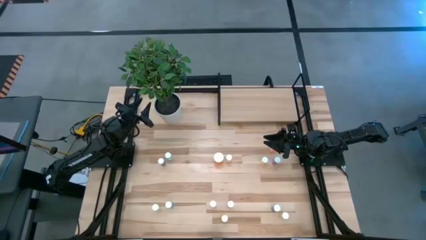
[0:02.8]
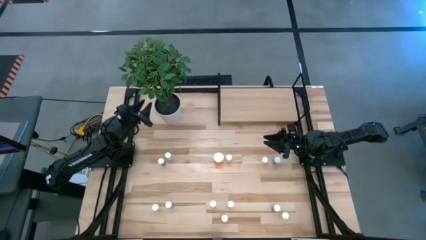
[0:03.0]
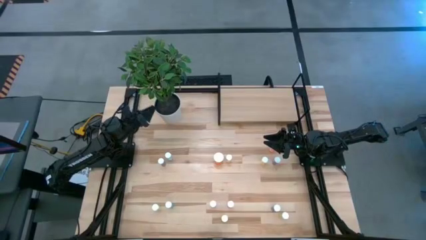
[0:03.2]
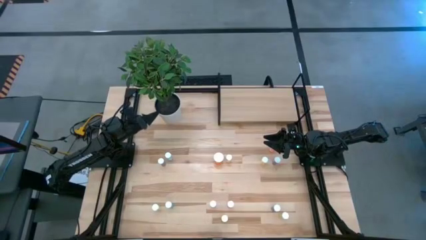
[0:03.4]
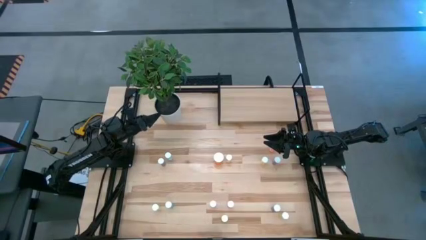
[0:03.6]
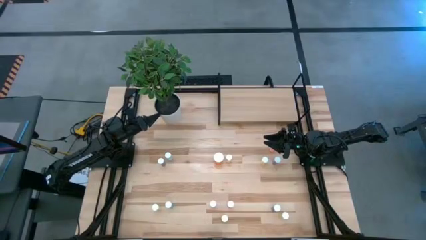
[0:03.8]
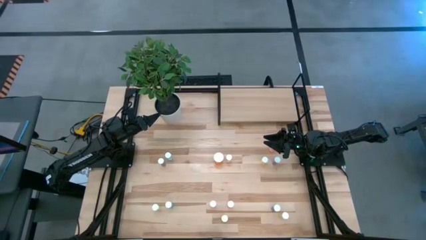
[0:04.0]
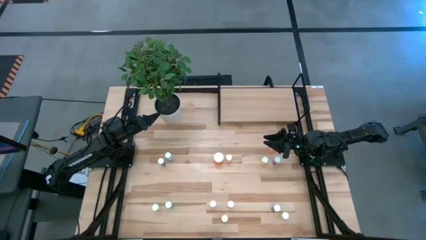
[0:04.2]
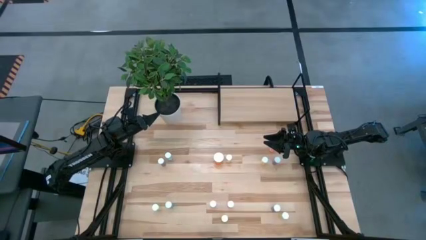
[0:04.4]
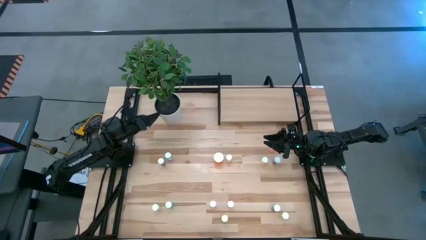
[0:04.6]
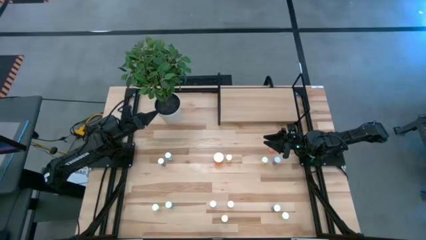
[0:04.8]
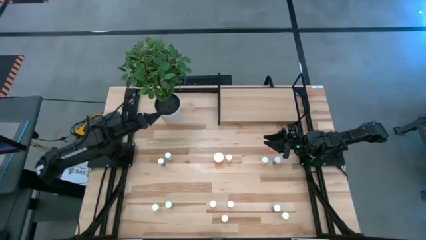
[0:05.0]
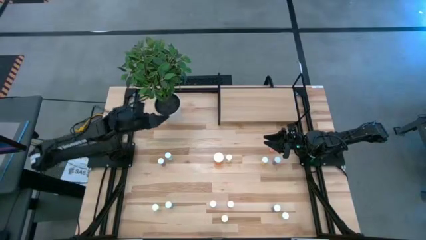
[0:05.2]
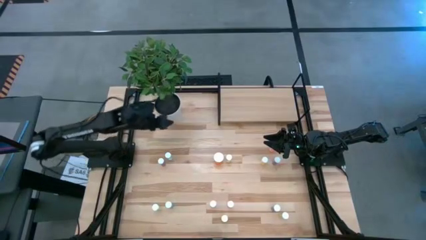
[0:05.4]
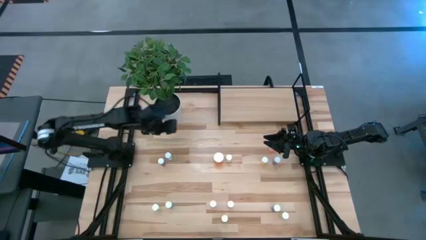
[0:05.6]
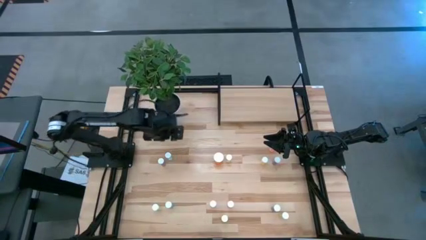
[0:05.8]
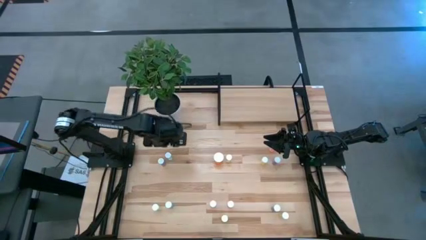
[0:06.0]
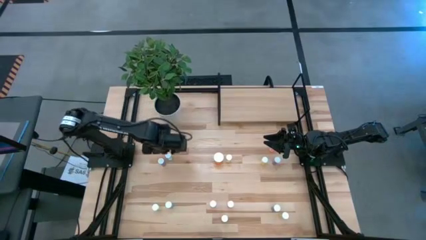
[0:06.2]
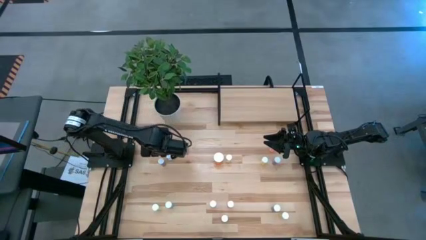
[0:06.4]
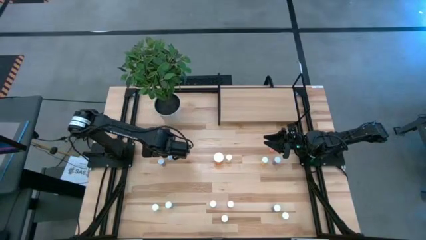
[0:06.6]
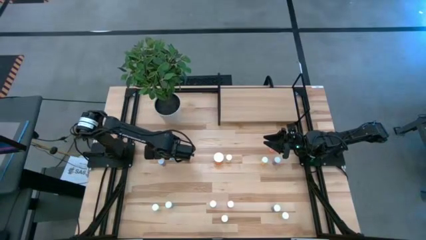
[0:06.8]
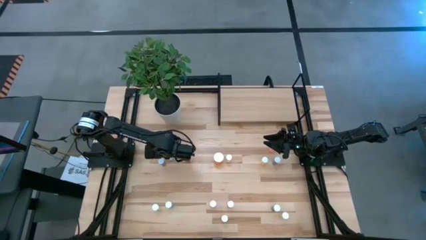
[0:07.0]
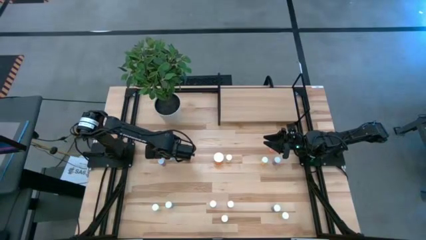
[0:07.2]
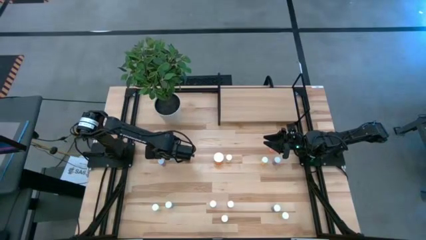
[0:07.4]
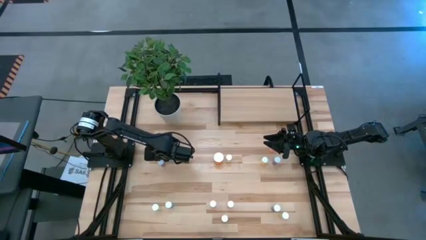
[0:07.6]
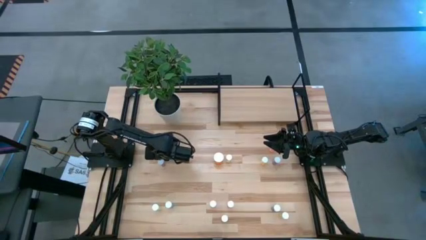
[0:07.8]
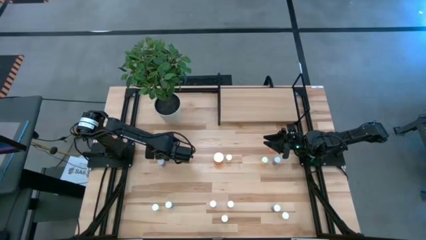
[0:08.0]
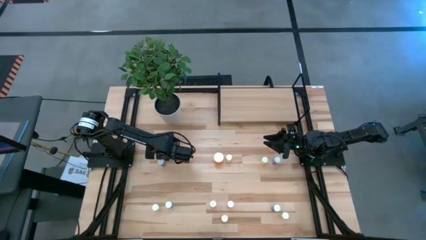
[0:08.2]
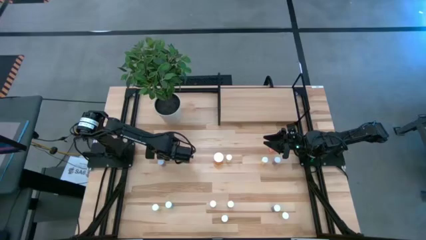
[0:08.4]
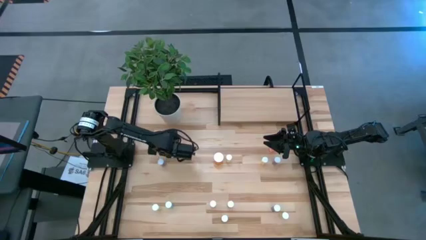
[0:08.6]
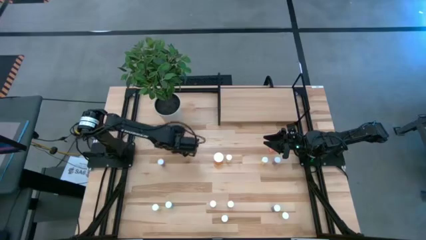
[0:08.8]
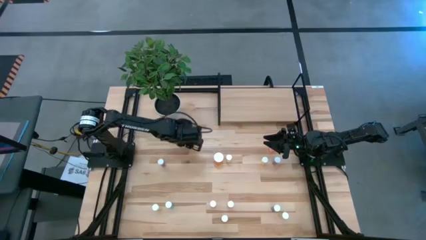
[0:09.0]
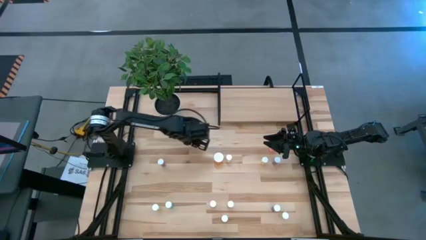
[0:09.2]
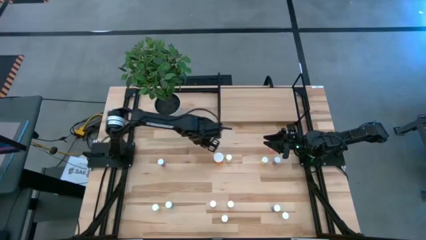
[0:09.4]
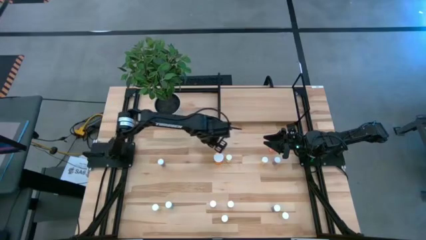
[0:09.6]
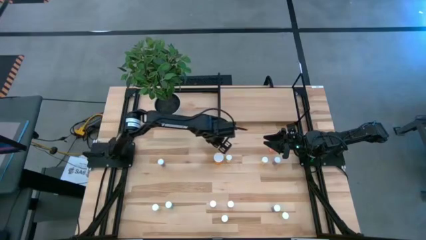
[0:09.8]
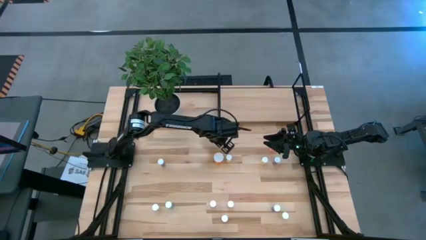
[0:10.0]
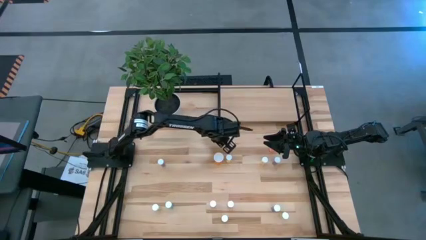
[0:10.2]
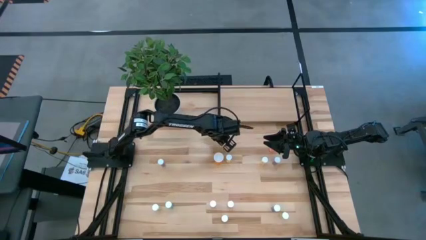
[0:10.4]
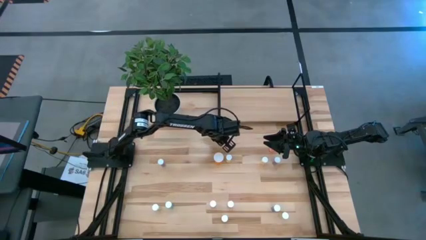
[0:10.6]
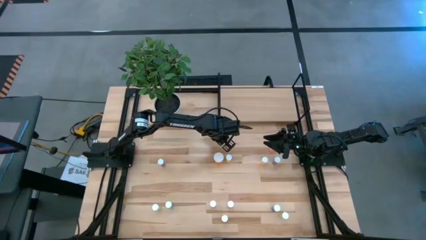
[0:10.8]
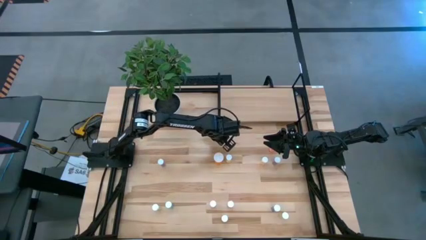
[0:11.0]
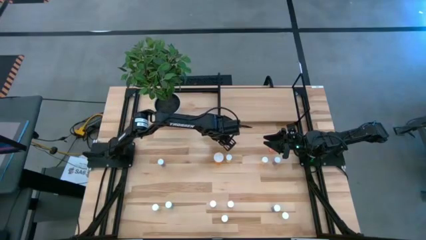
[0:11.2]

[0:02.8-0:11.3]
Task: Pick and place medicine bottles onto shelf by color
Move the green pill bottle to the top center of the table

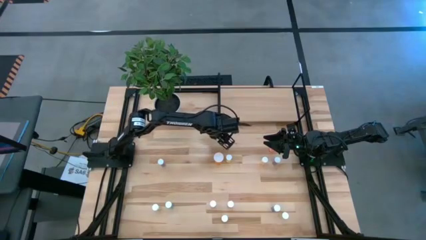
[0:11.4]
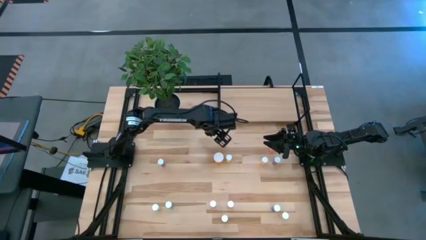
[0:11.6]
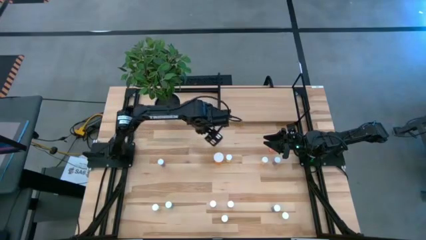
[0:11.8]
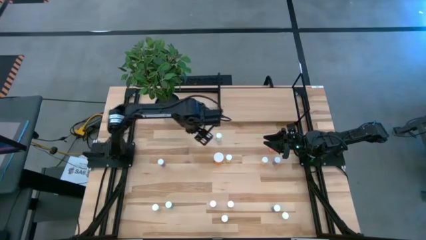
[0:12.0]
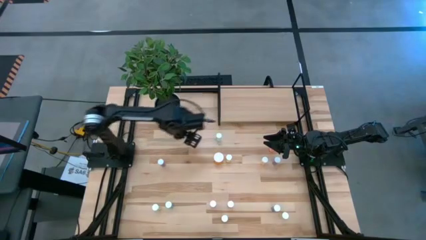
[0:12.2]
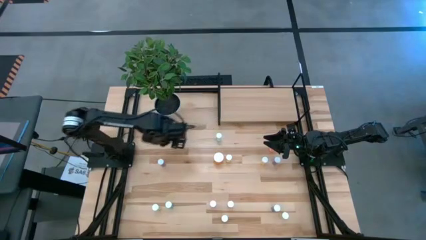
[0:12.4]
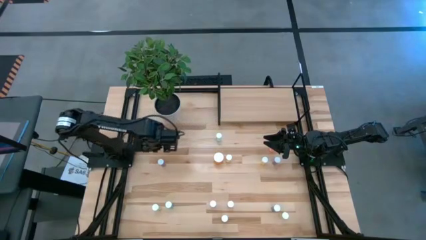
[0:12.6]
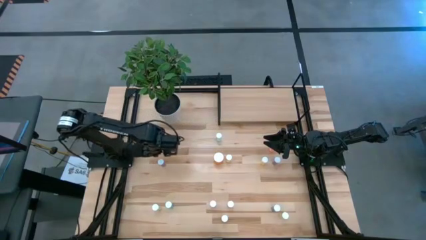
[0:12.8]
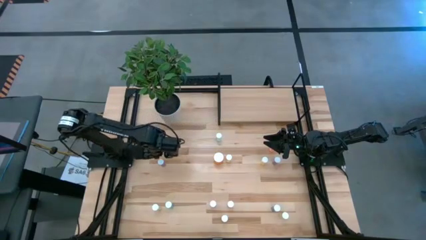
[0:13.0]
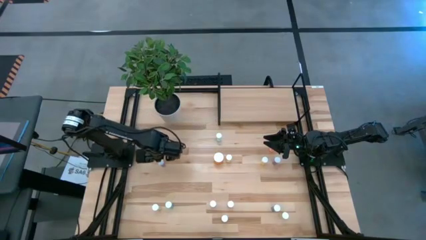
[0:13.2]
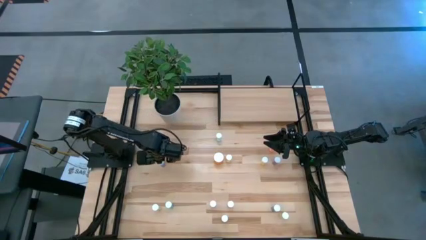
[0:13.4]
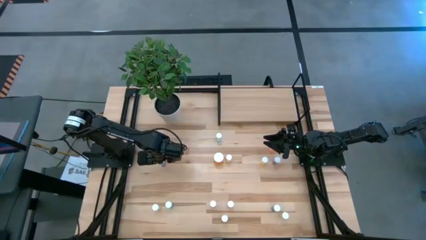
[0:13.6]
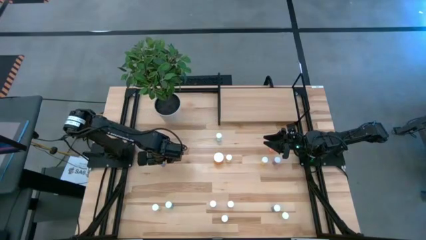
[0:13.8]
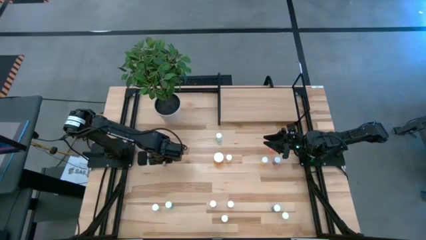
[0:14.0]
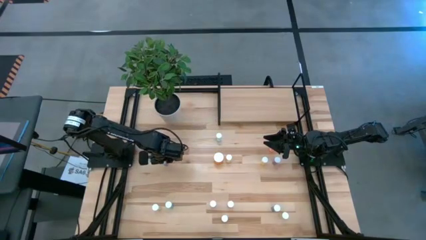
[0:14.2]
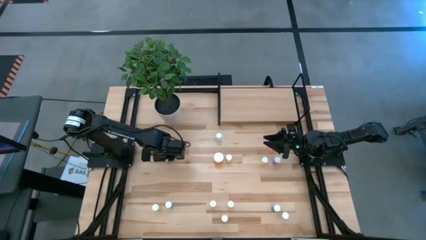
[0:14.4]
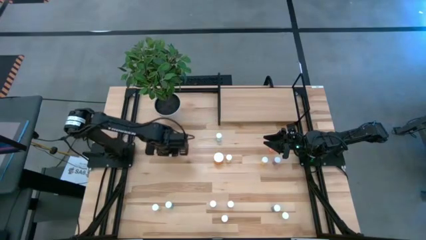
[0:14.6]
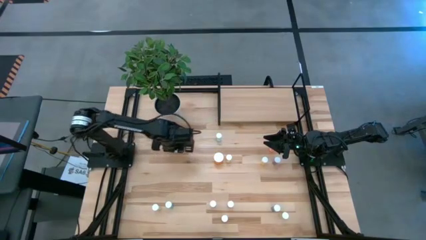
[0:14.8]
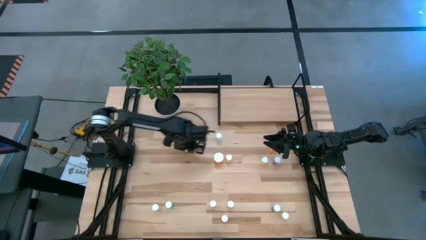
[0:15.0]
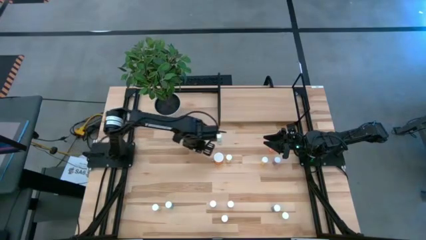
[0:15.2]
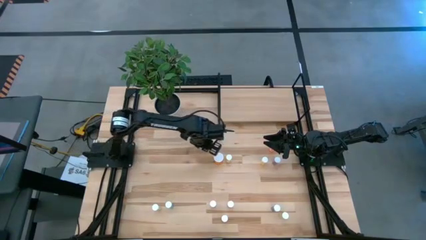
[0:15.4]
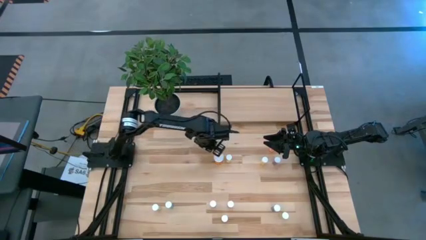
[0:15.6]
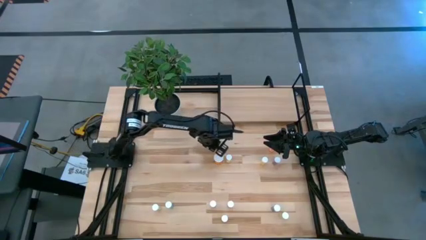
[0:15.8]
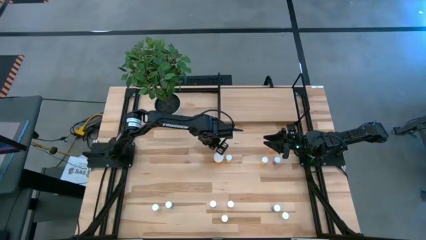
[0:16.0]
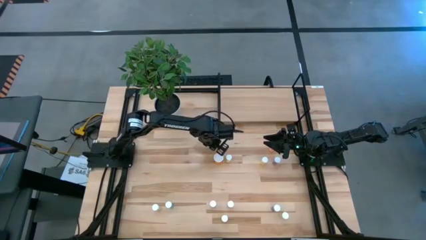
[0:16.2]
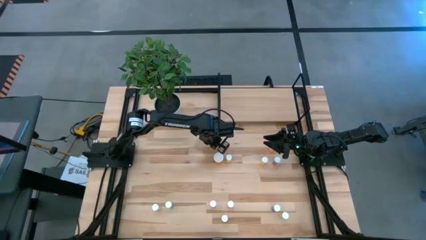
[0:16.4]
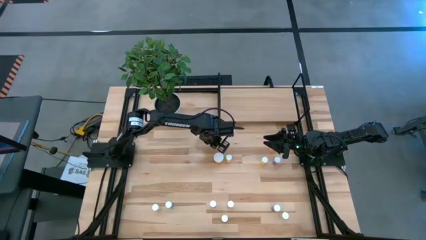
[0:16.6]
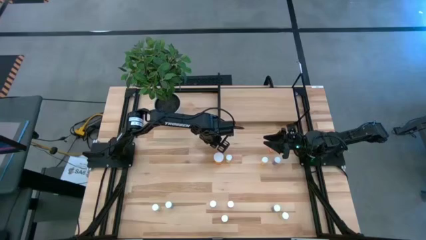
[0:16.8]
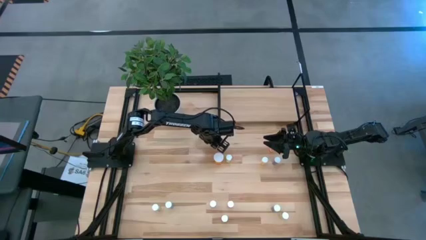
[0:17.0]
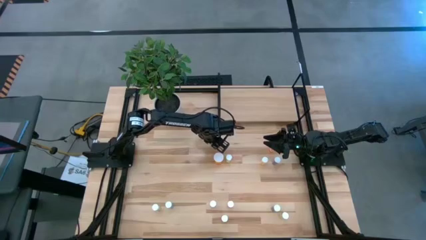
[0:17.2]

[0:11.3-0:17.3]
Move the blue pill bottle to the top center of the table

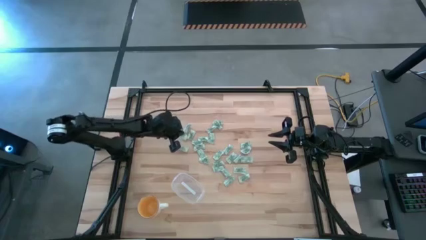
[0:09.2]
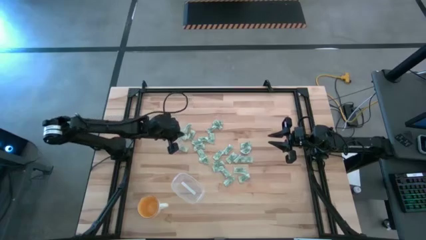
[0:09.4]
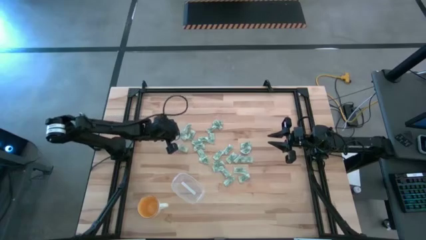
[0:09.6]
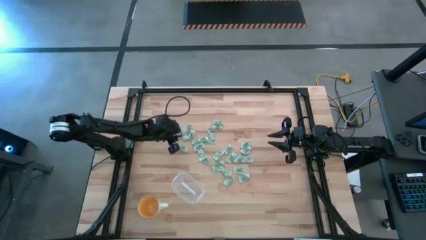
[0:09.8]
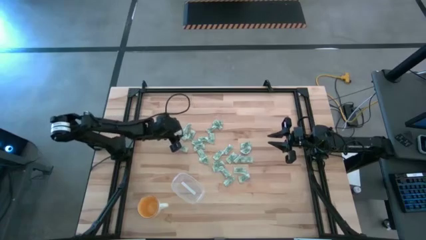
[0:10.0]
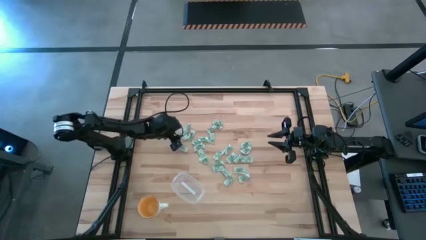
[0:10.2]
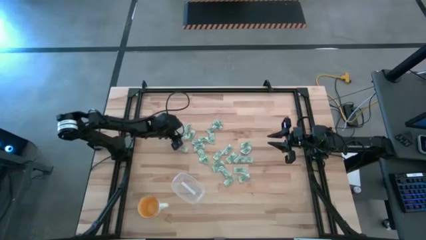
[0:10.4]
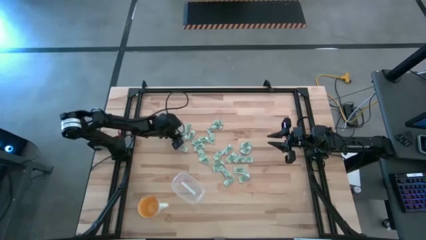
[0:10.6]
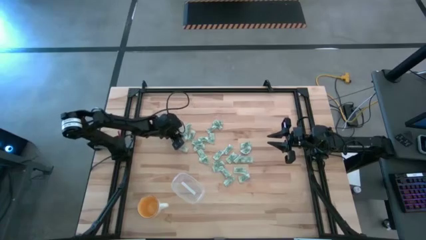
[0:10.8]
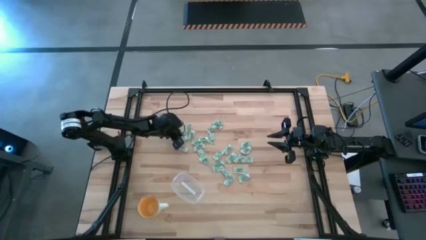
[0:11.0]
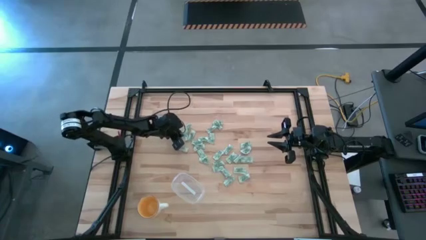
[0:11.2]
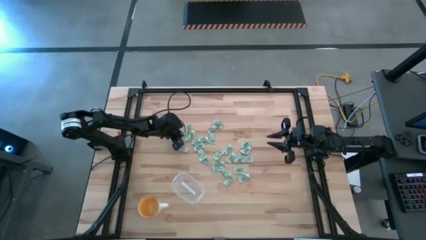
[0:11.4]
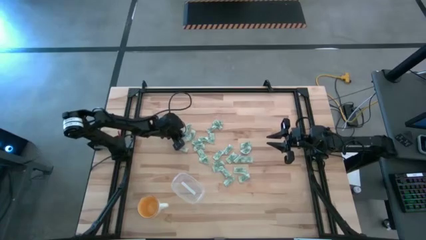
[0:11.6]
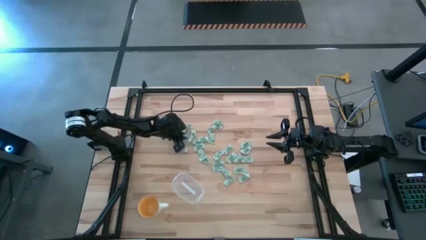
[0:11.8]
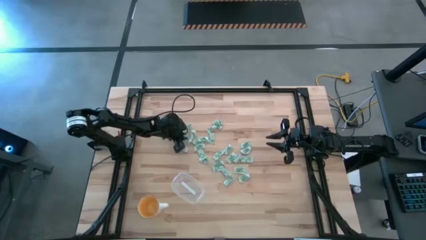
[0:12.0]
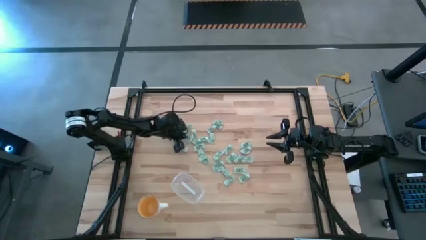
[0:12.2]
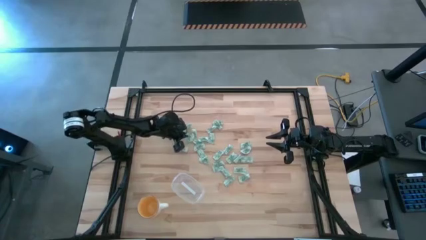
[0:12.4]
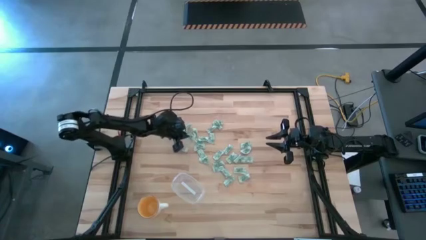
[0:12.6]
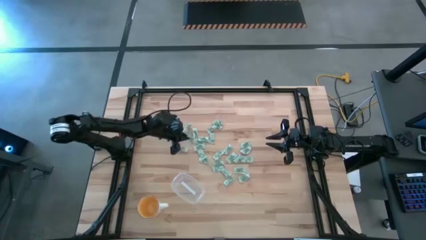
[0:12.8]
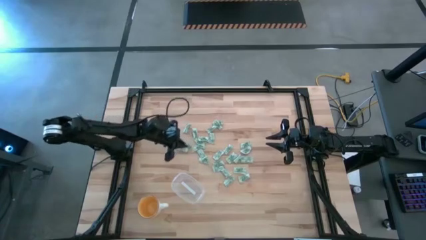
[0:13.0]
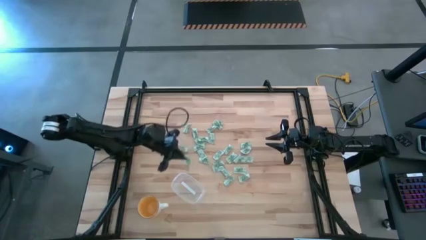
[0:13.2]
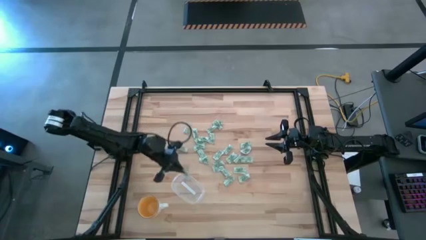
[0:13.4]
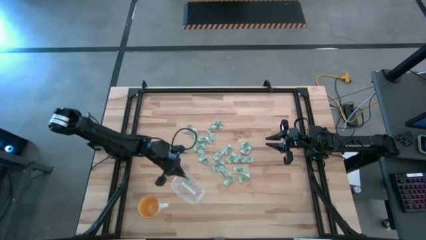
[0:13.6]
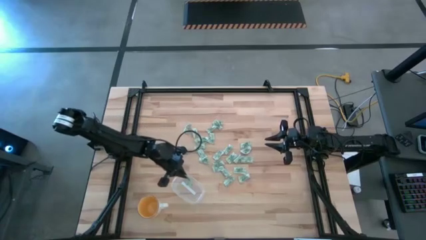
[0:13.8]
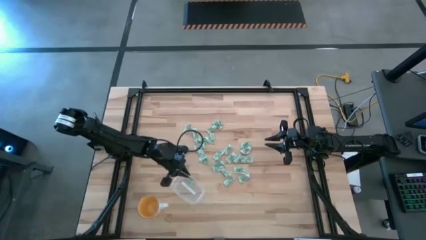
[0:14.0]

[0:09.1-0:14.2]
Task: Pick and place Stevia / Truvia into bins
Put the stevia packet into the transparent container
